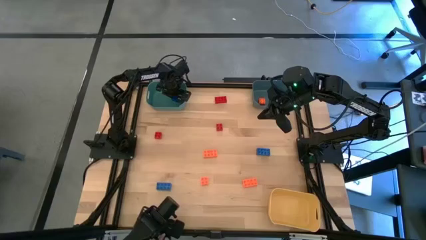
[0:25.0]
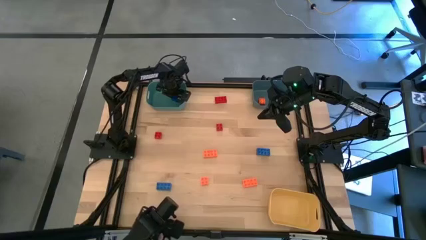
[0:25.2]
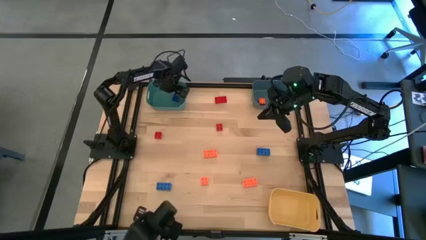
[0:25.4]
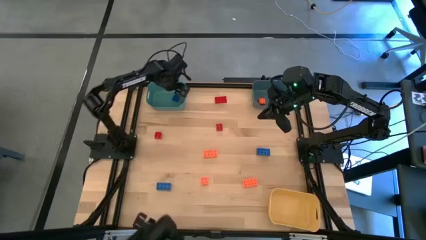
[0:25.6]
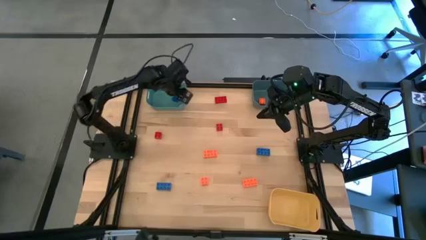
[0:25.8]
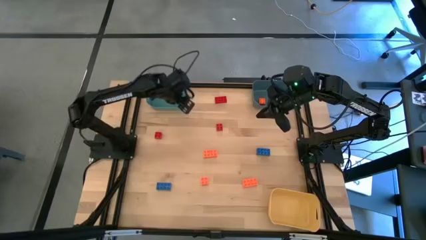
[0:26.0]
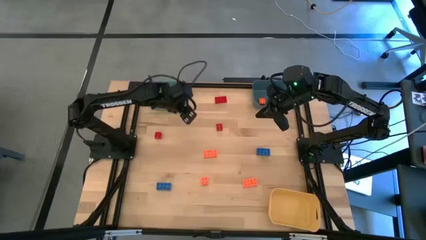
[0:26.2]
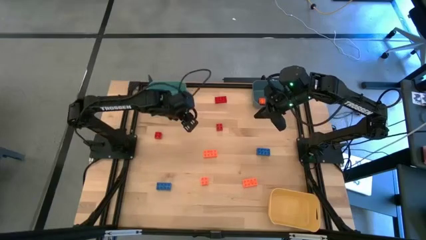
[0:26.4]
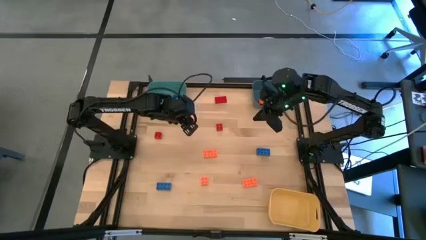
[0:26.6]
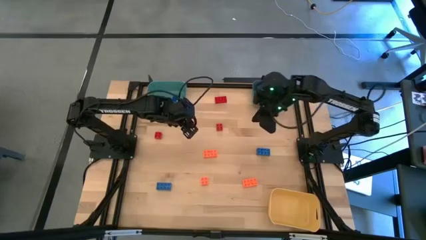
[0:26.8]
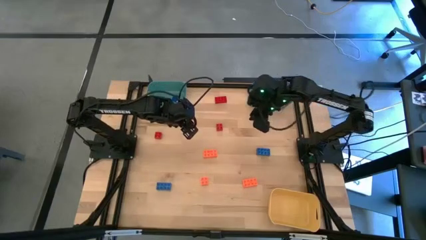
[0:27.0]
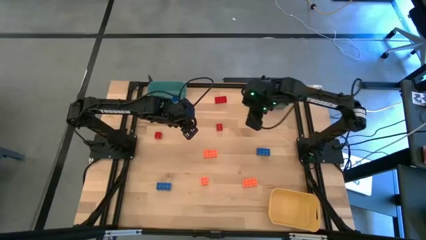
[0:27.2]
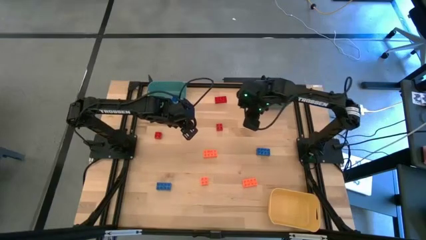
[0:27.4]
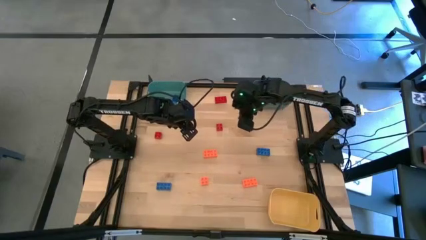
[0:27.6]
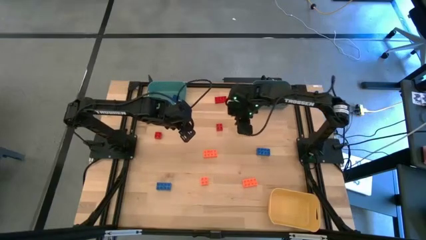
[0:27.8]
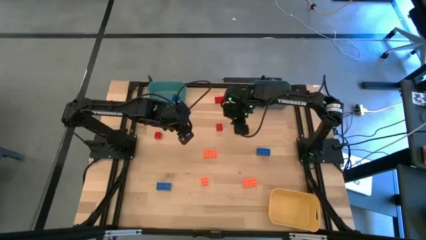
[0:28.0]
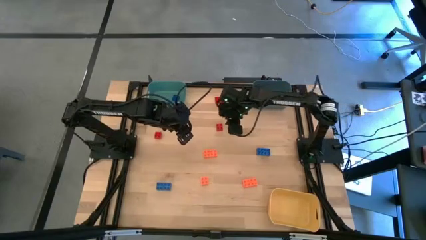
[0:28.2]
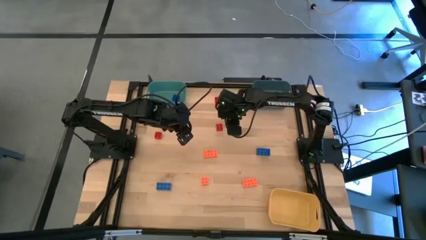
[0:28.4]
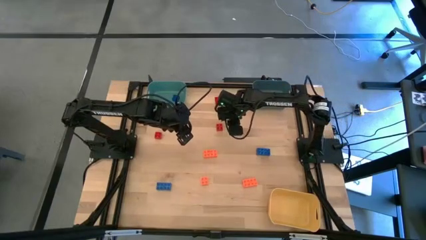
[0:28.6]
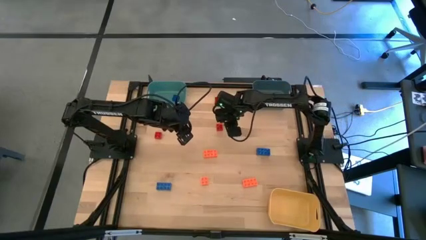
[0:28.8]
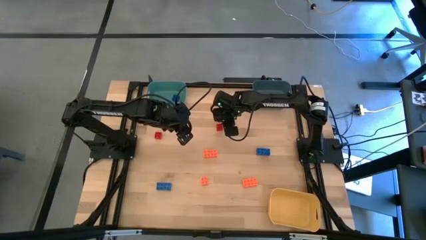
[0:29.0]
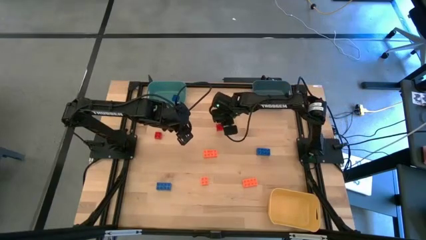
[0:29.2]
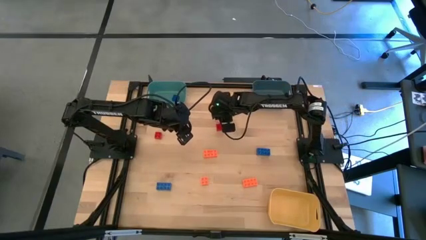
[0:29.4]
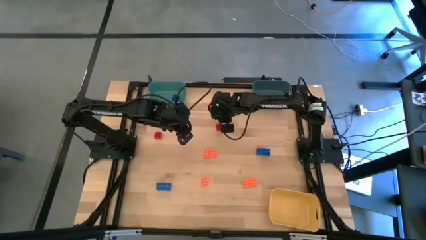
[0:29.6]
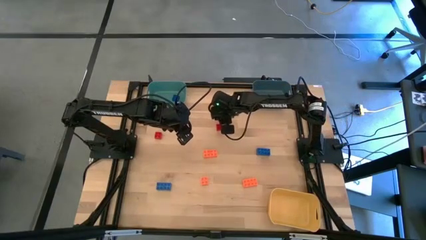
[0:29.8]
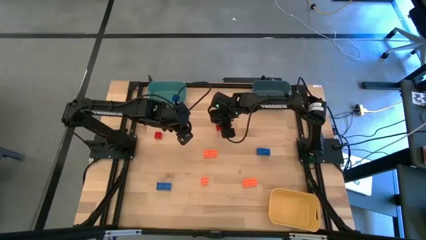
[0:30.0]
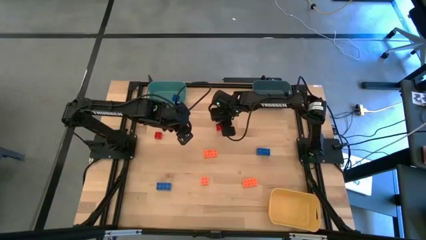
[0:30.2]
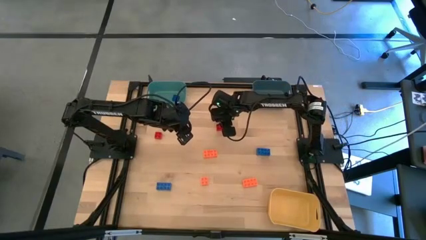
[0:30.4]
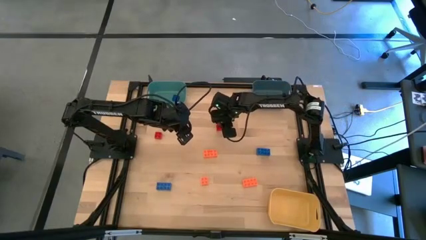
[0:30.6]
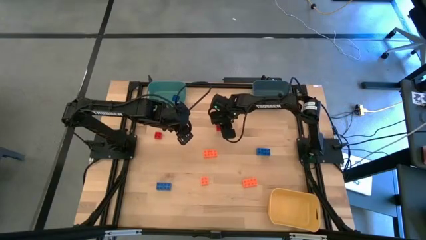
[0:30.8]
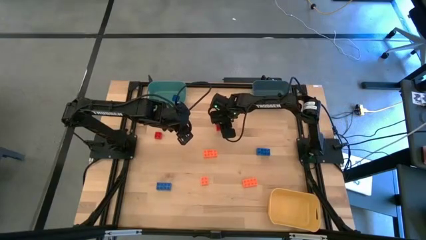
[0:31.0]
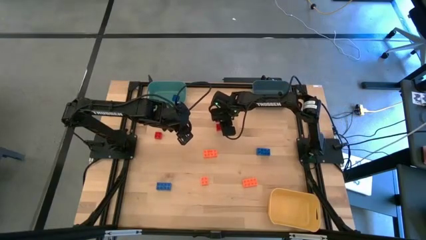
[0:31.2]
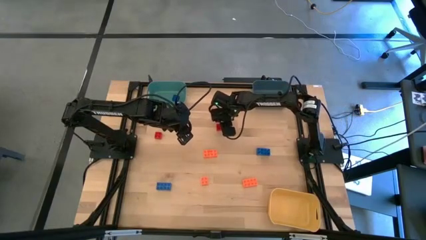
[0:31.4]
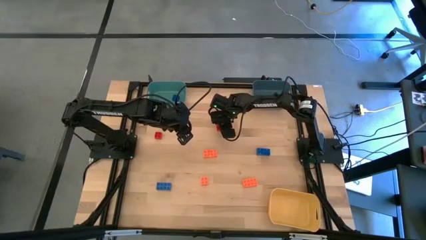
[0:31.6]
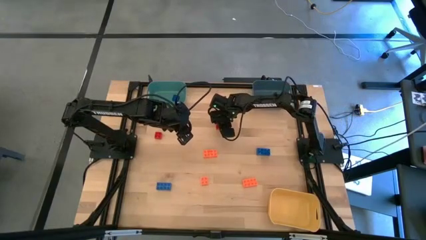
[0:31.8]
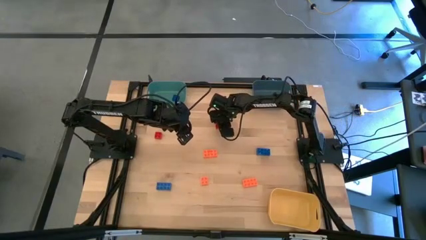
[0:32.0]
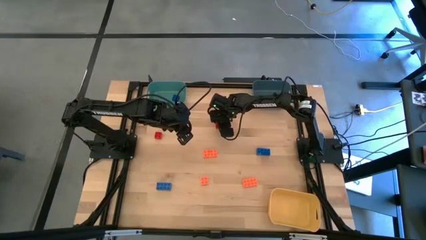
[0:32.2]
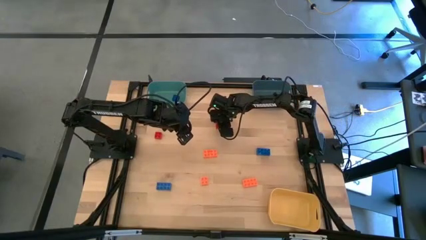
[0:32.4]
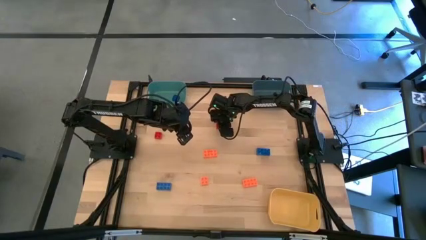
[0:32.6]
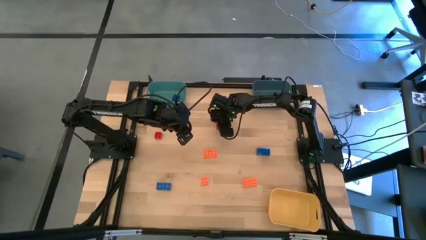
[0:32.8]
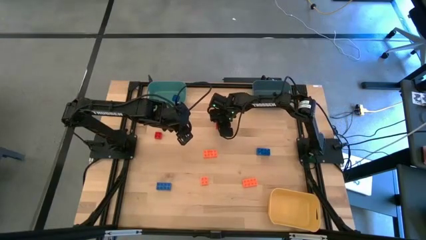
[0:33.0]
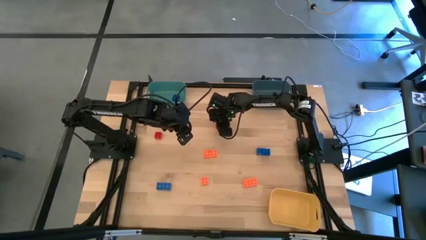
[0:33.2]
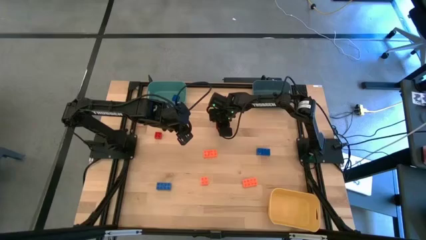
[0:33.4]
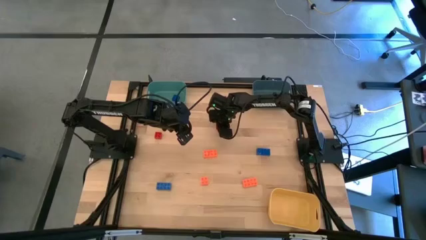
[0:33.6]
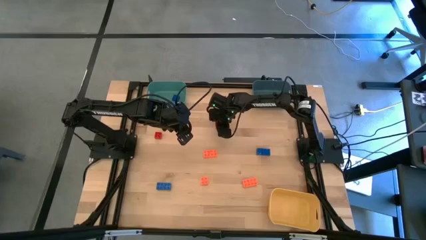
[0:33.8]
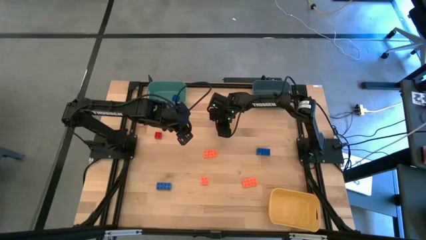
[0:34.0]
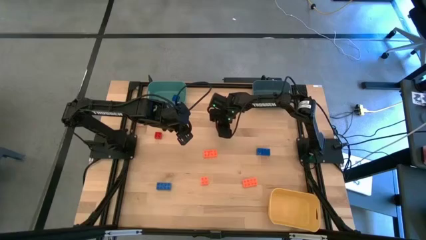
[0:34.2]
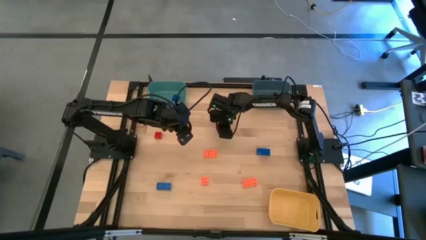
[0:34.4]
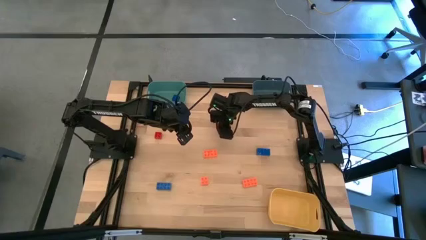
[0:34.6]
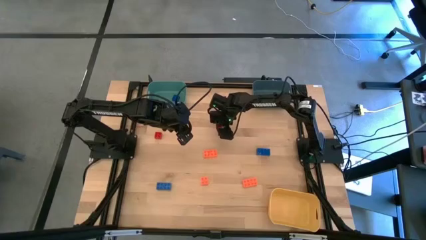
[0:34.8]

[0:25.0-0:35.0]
Task: Sort & place blocks by color
Put the red game piece into the yellow bin

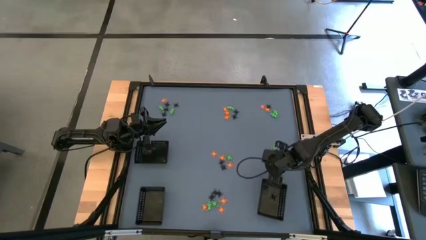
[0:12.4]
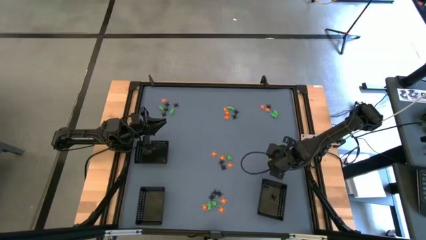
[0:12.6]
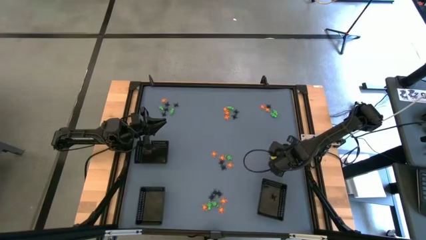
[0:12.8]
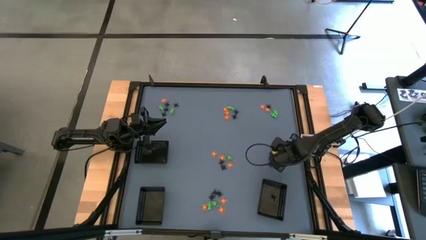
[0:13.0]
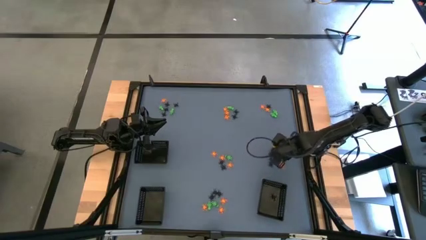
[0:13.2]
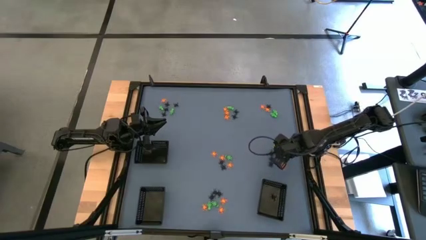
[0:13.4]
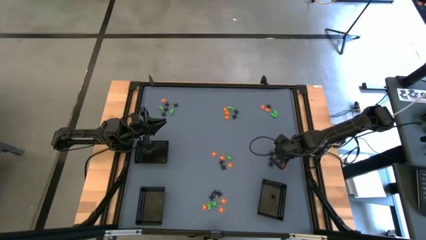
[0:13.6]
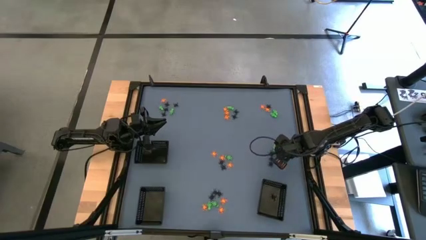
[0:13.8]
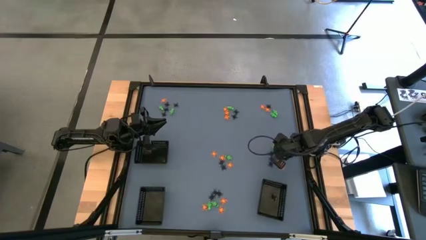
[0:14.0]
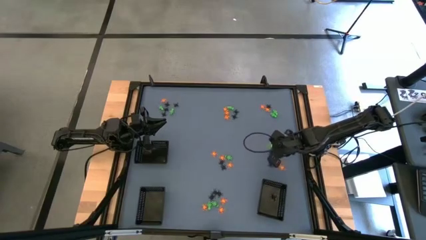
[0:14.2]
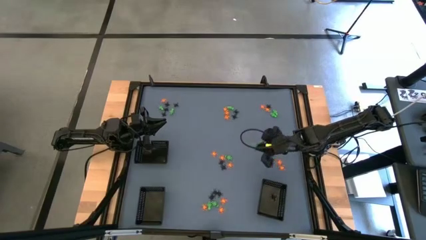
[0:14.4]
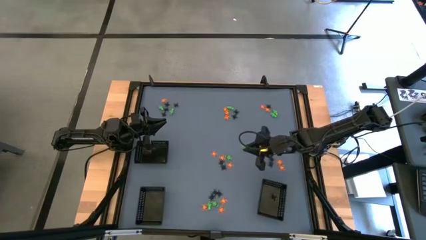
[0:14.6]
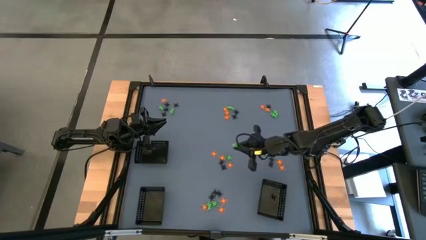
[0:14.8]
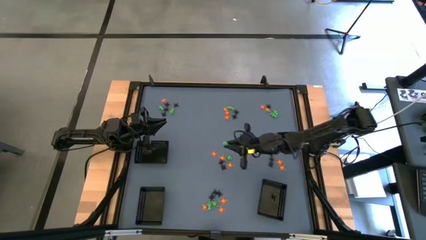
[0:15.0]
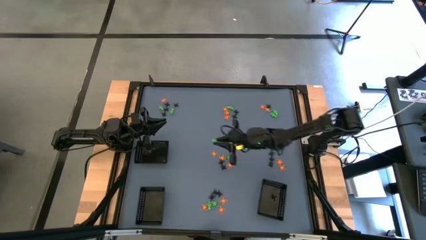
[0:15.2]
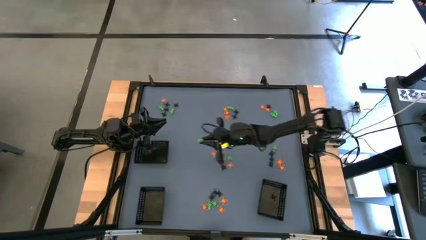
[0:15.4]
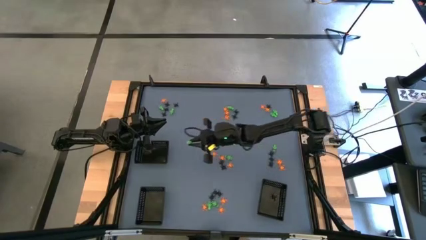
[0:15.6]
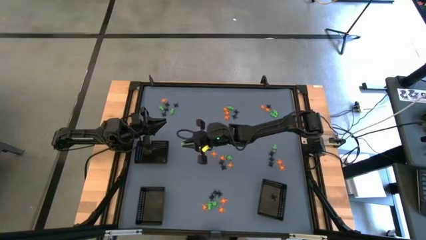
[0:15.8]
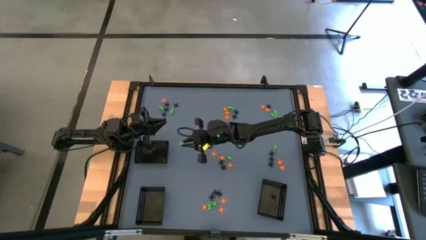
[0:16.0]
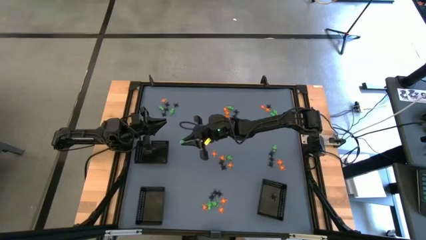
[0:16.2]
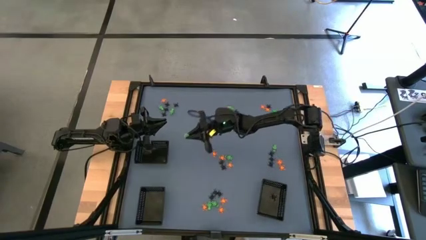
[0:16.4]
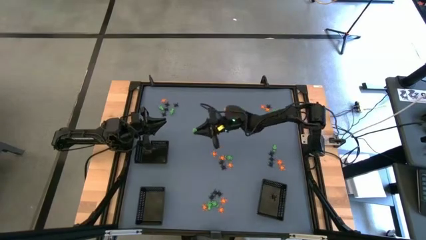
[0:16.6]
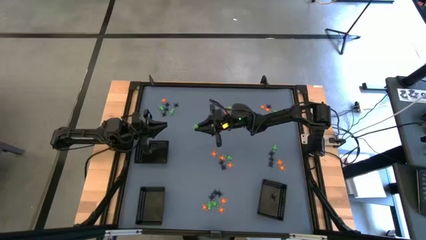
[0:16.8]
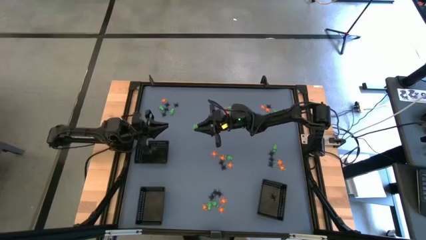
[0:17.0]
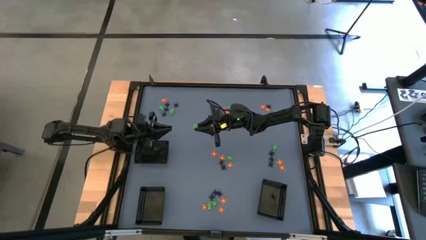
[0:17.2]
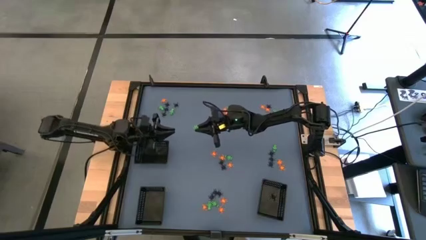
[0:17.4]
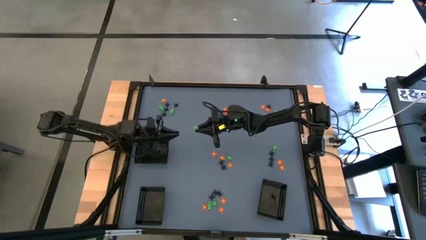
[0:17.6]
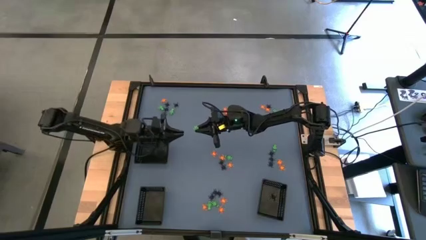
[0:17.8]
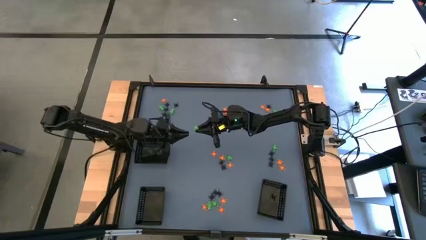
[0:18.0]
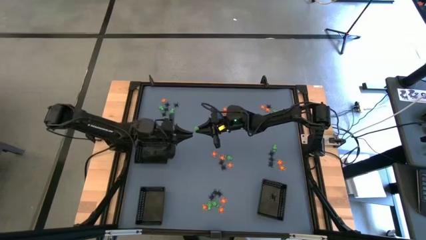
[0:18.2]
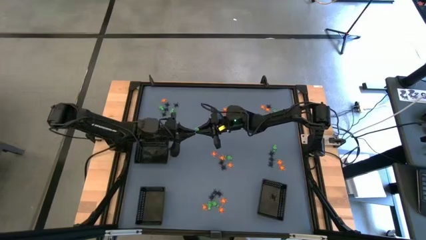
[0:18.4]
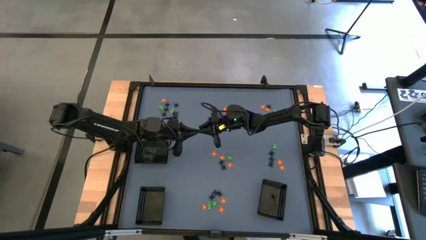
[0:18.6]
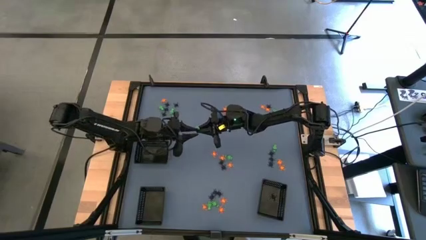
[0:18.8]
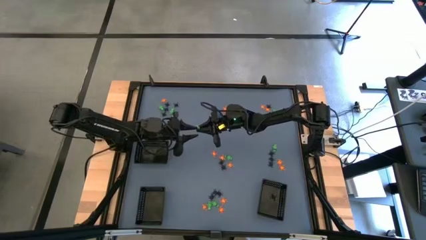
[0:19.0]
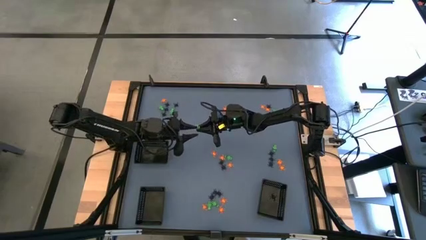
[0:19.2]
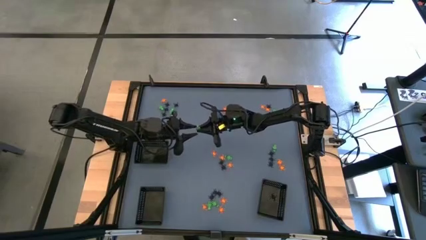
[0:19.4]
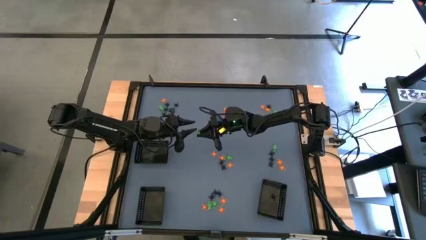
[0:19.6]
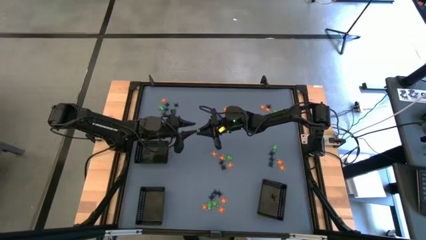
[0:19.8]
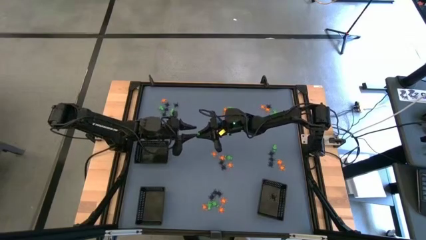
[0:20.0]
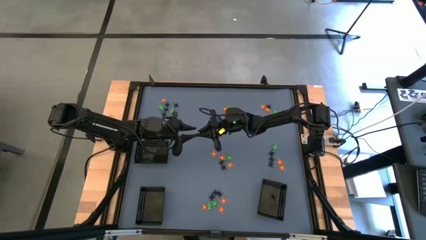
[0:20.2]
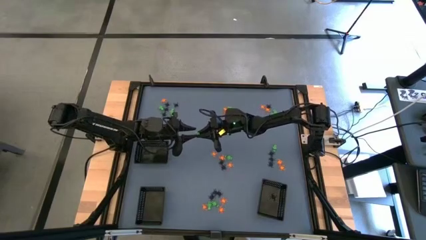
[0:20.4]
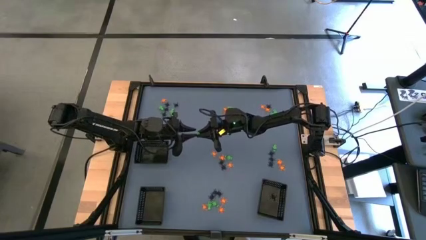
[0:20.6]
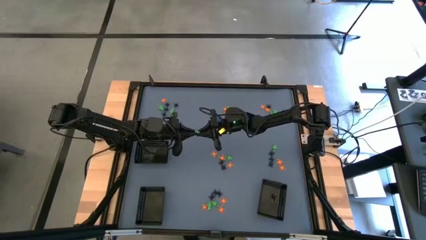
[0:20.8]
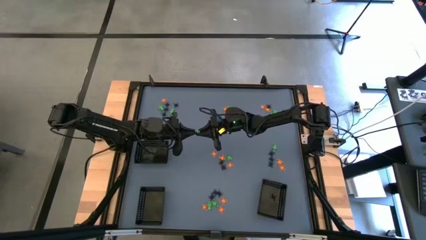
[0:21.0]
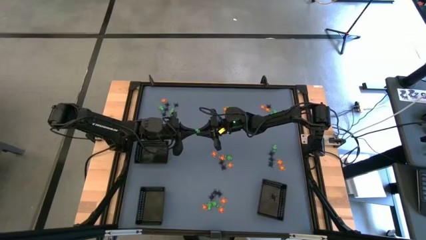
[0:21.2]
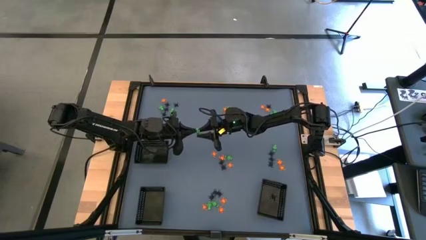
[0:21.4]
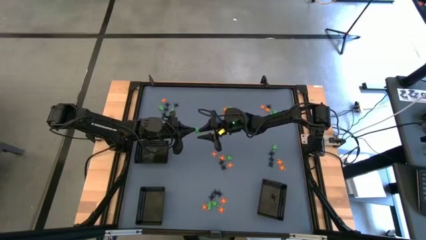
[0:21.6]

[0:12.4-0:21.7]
Task: Sort Halloween decoration
Put the green skeleton toy into the top black bin
